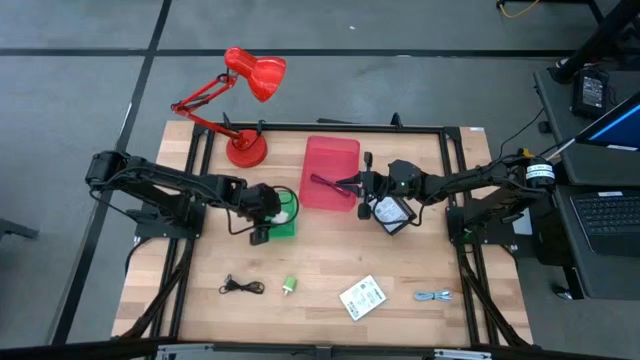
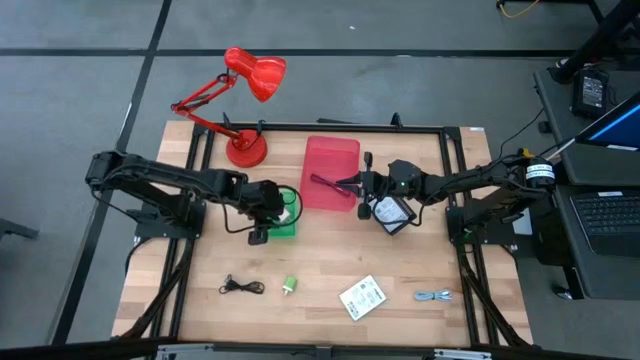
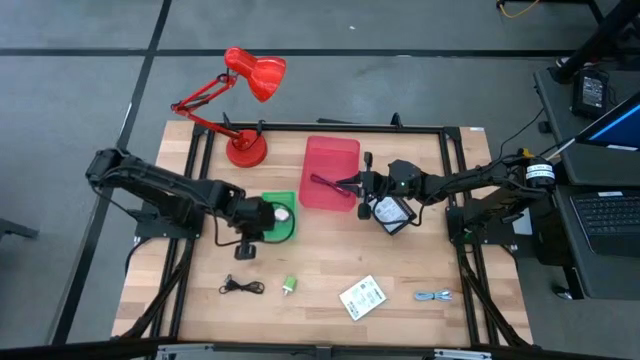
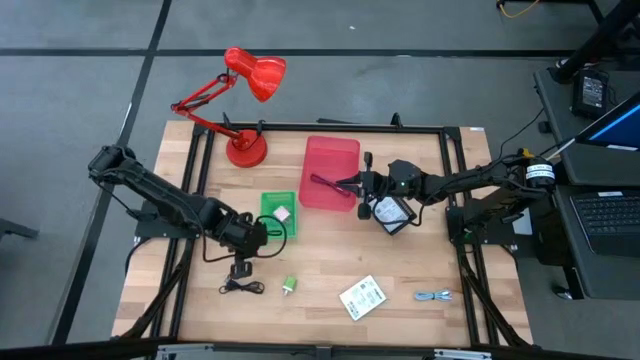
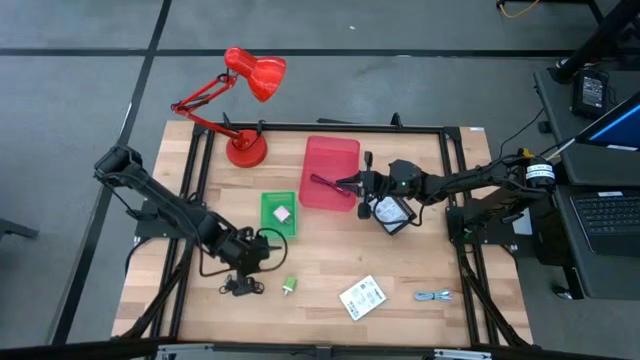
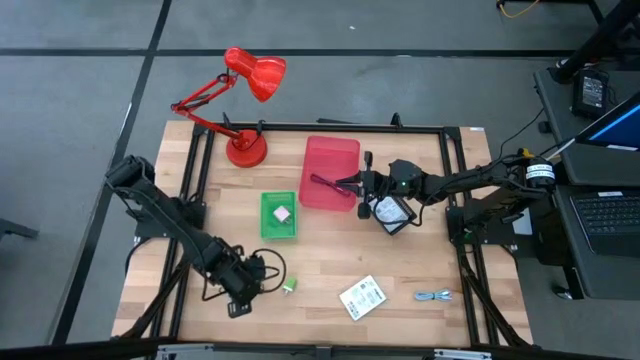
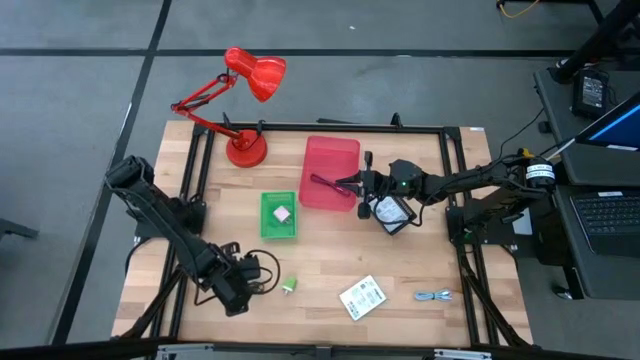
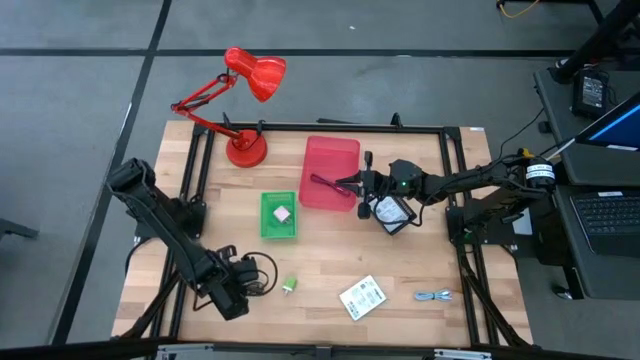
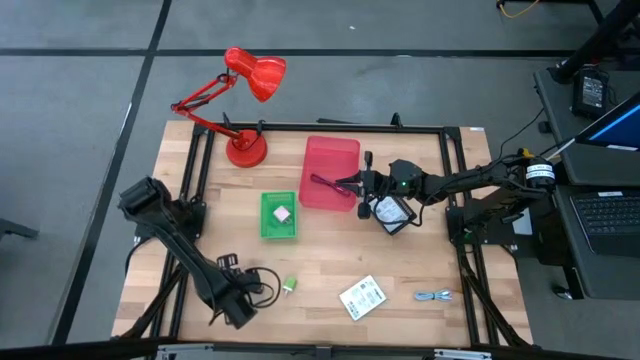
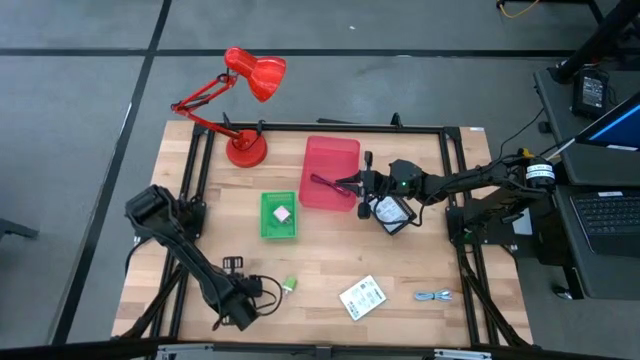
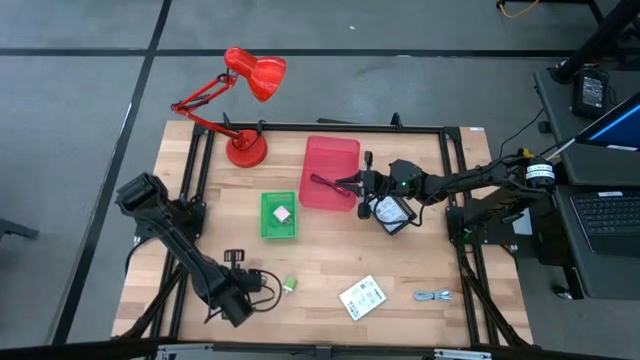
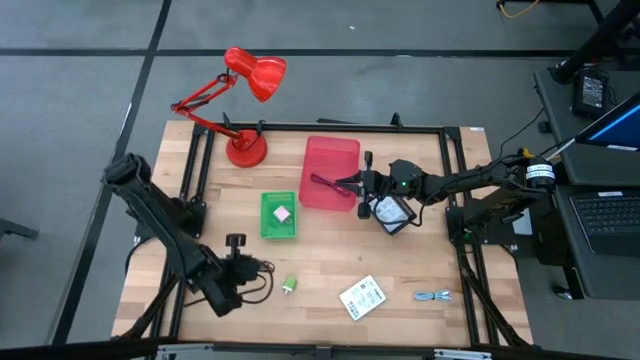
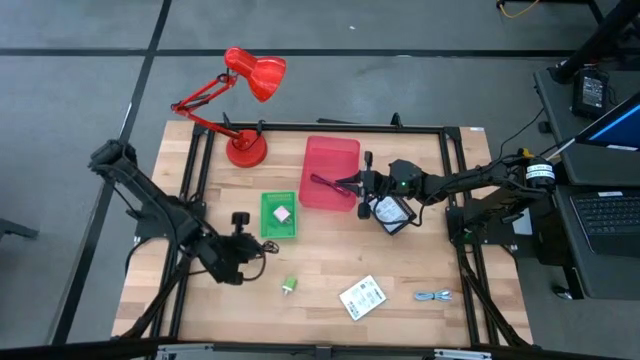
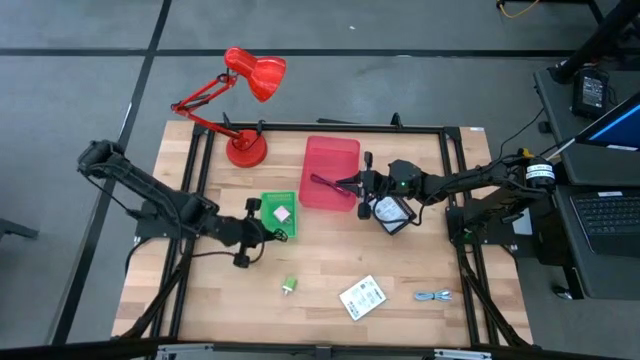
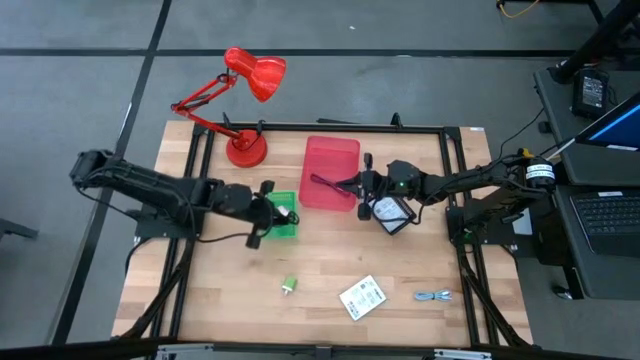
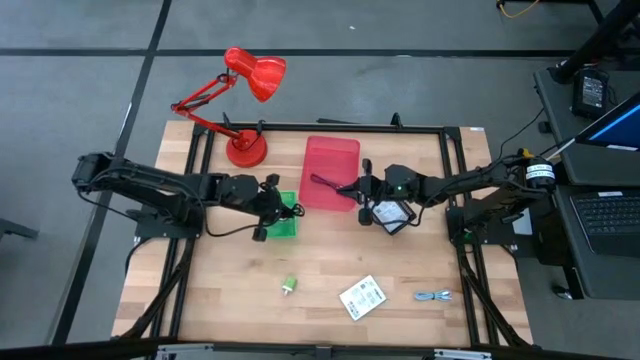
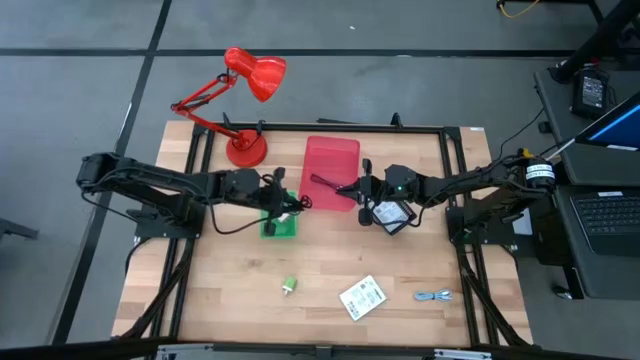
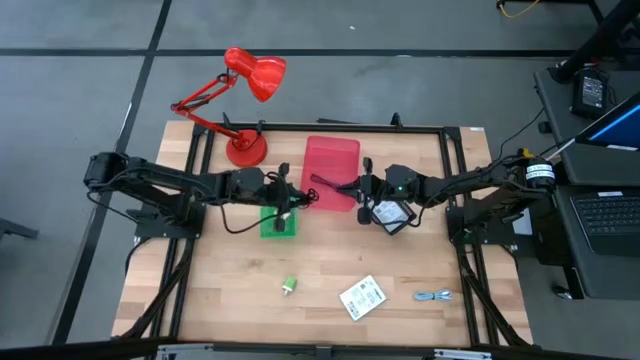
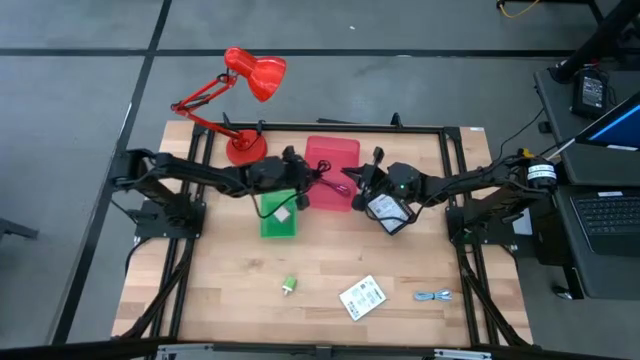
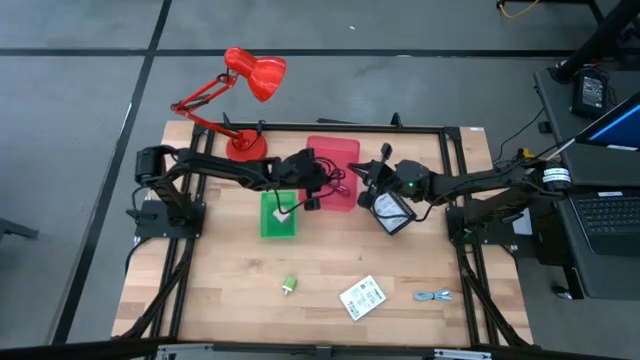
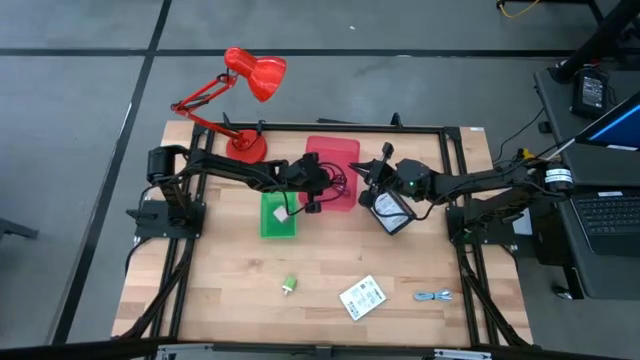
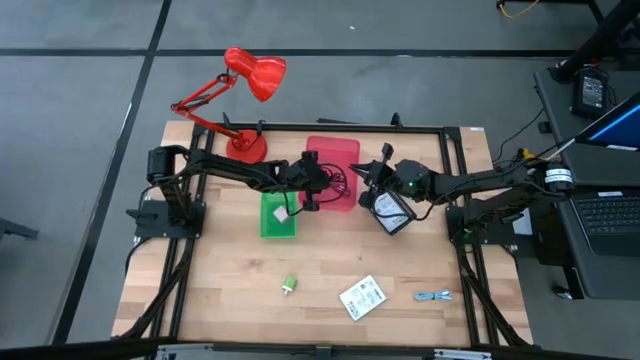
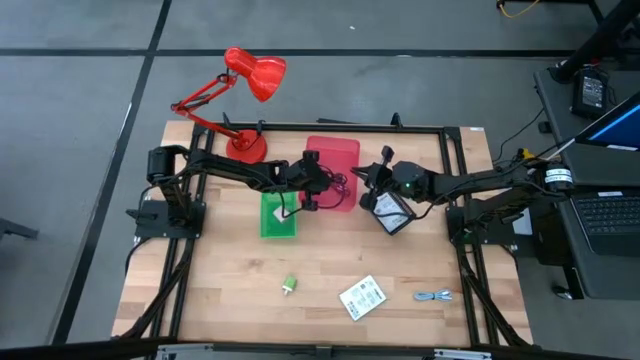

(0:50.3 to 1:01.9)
Task: Pick and place items into bin
Put the black charger cable into the pink bin

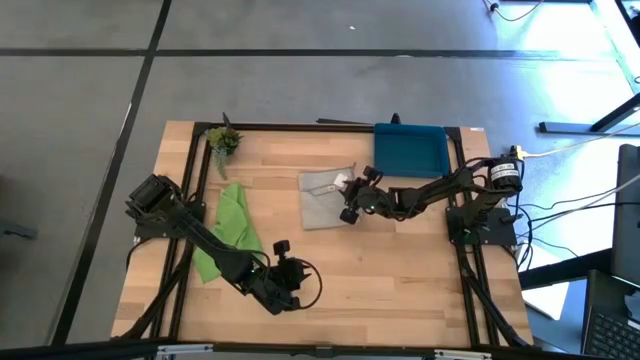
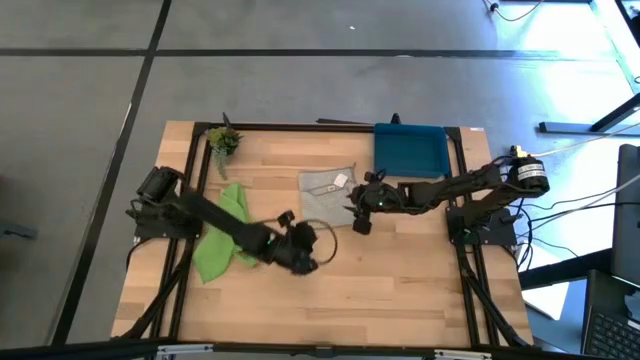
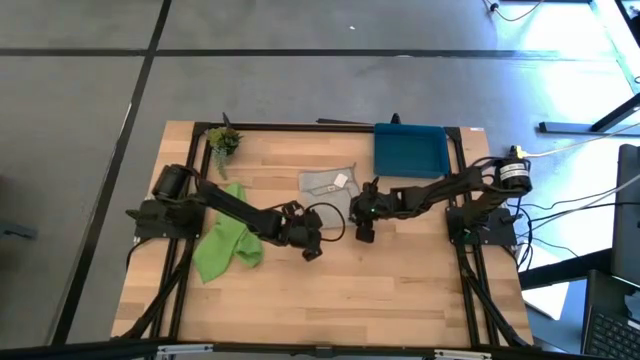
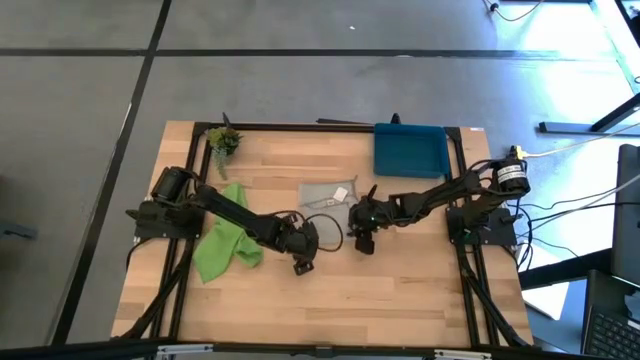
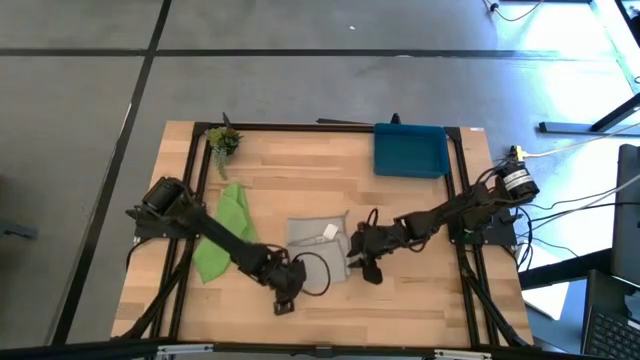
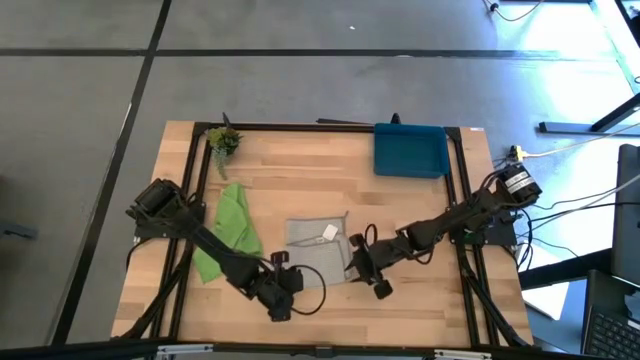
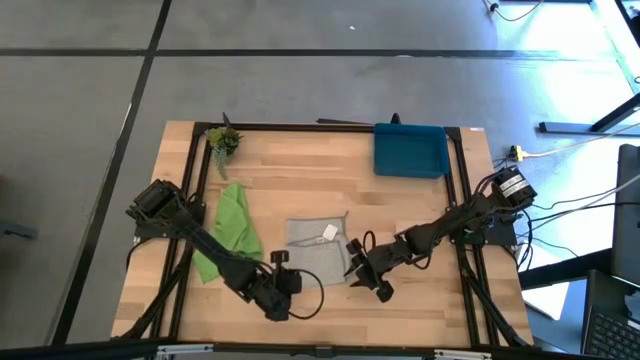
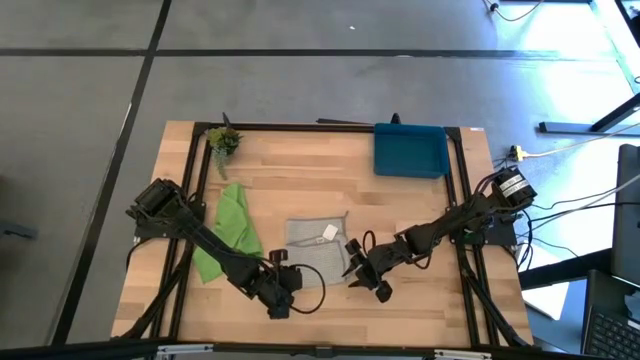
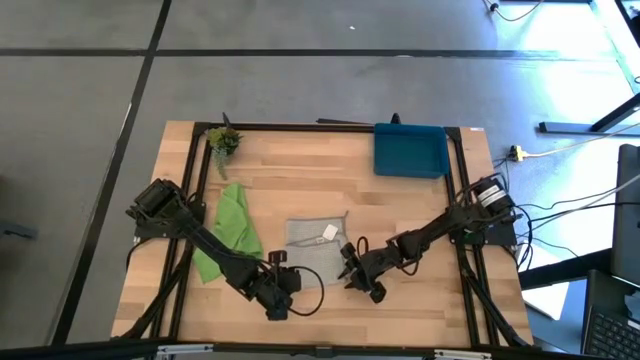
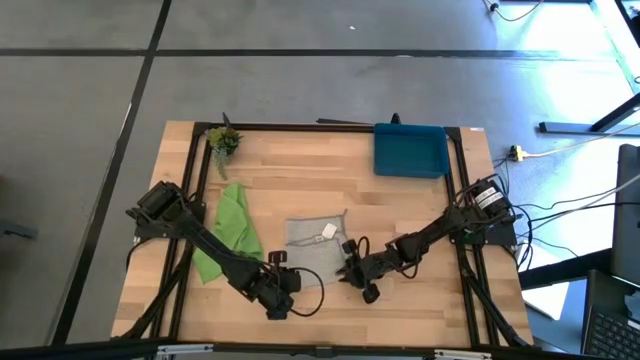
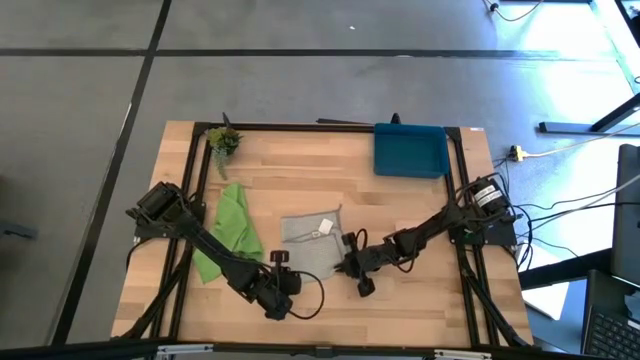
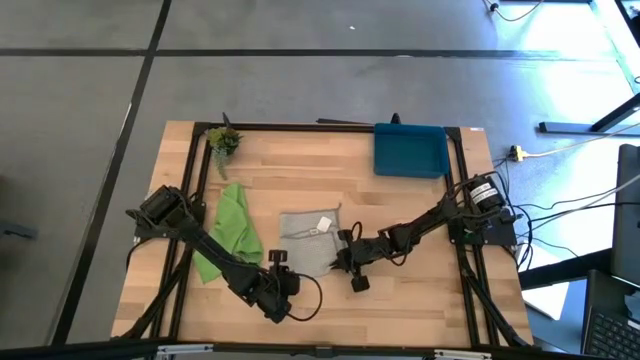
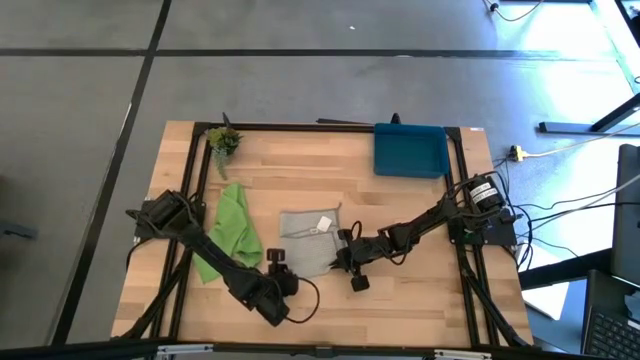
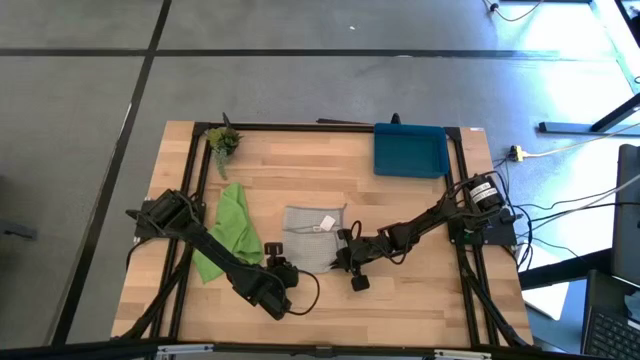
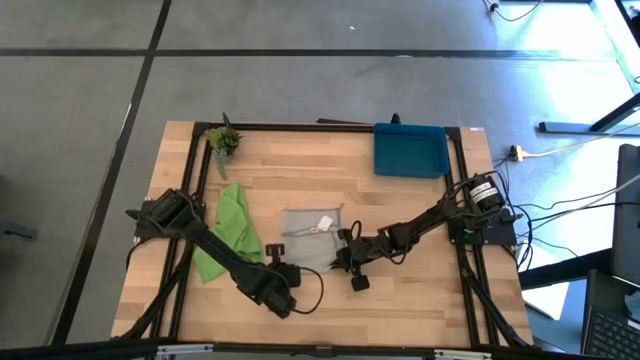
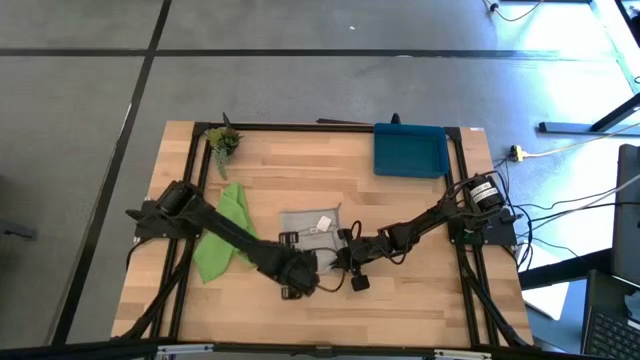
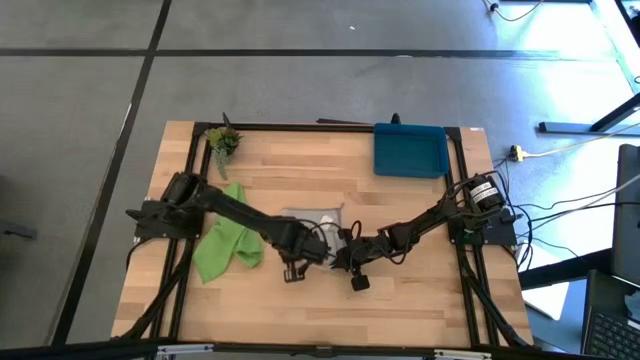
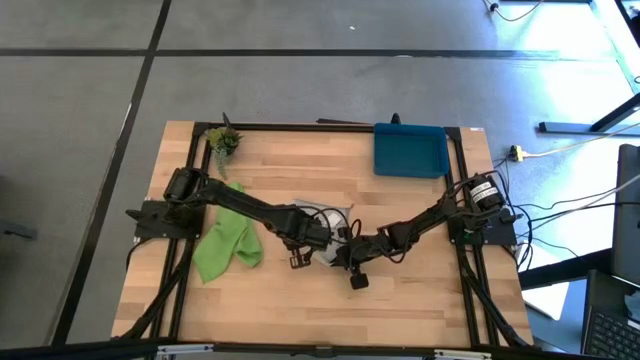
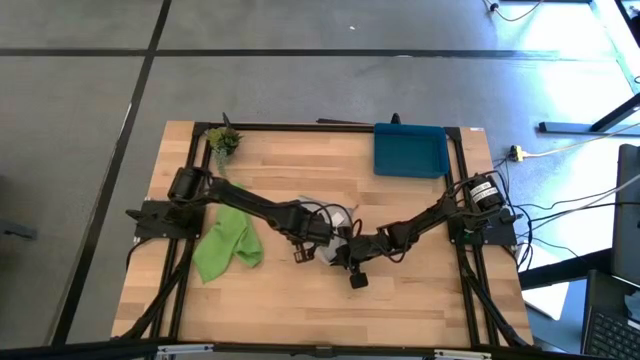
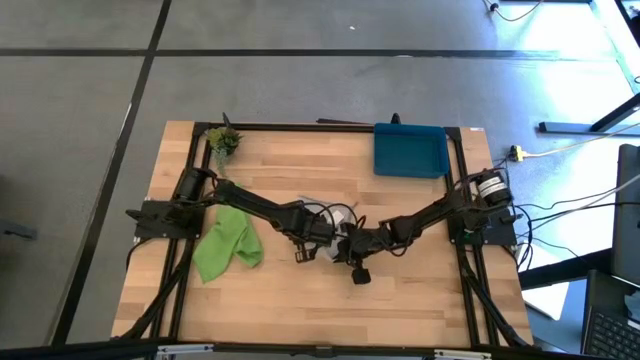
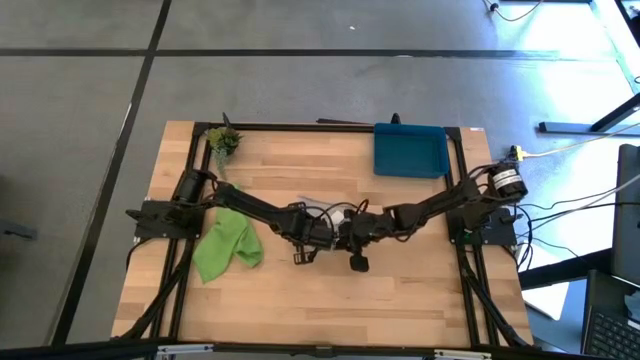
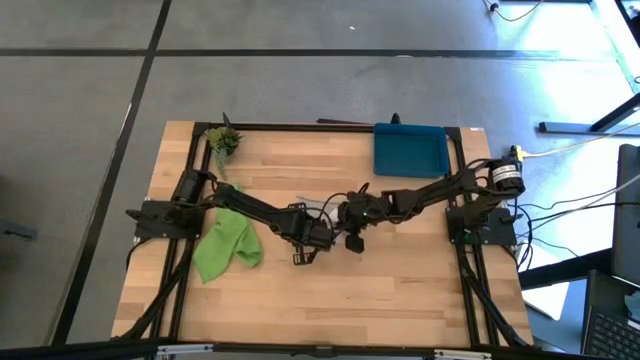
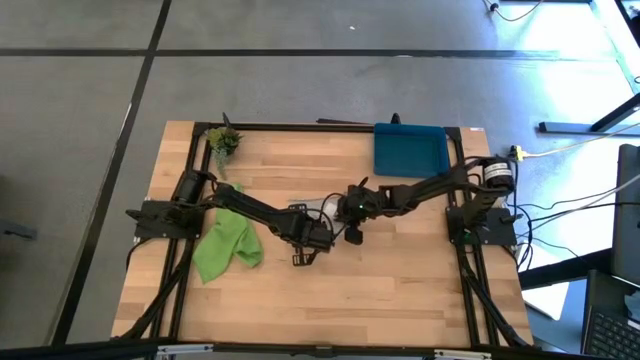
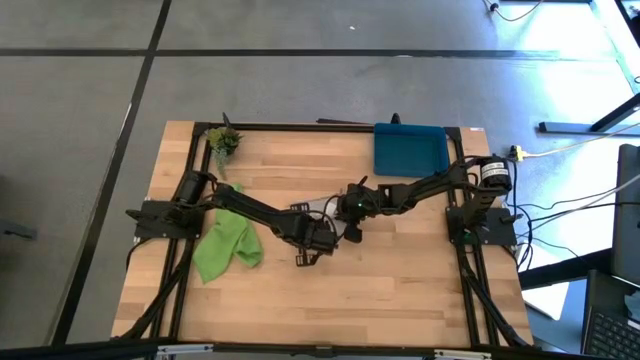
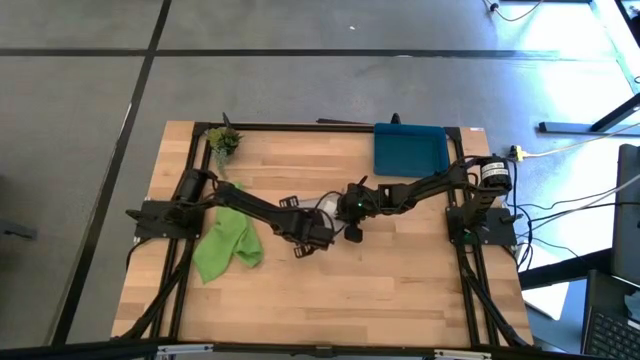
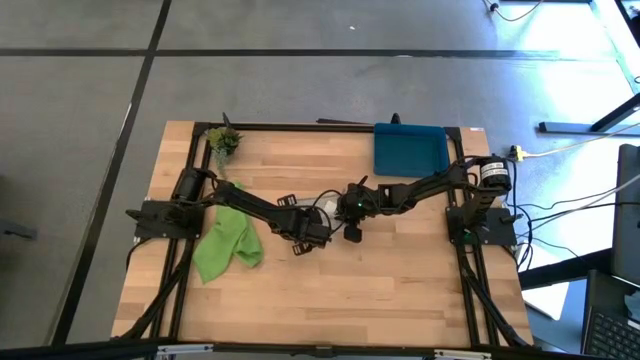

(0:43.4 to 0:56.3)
Task: Roll microfiber towels into tight, uniform cylinder then place into a basket
Roll the gray microfiber cloth
